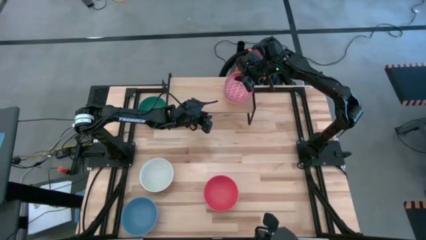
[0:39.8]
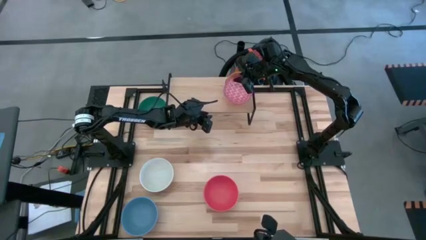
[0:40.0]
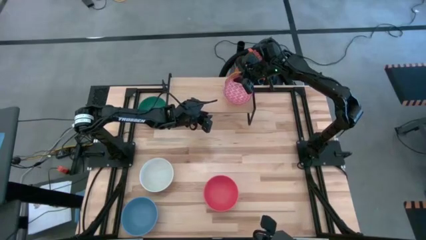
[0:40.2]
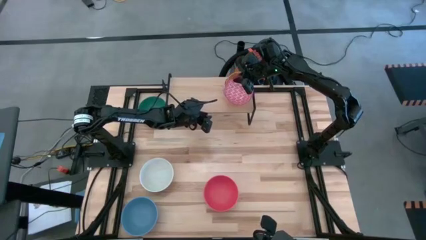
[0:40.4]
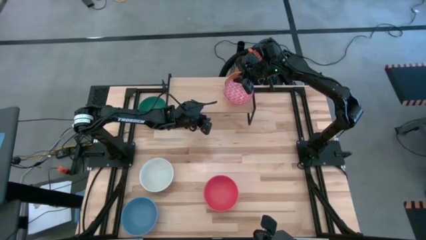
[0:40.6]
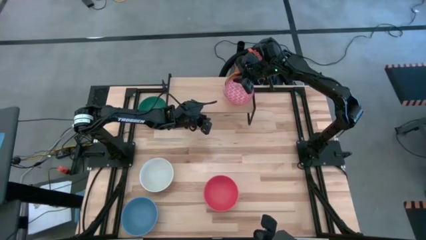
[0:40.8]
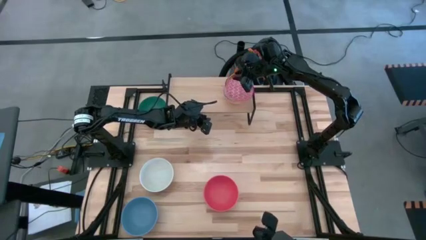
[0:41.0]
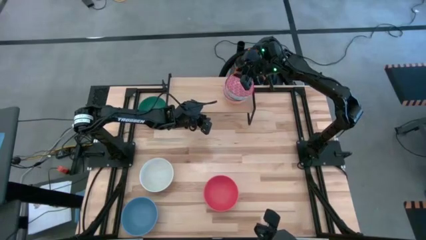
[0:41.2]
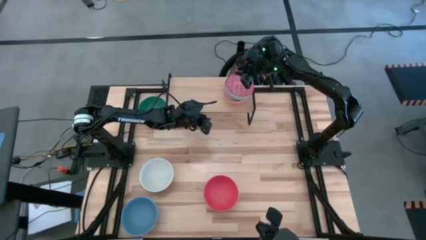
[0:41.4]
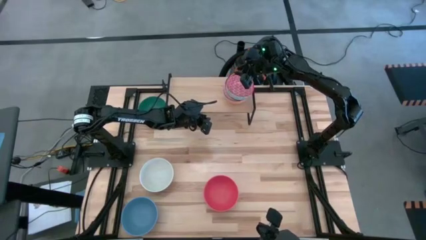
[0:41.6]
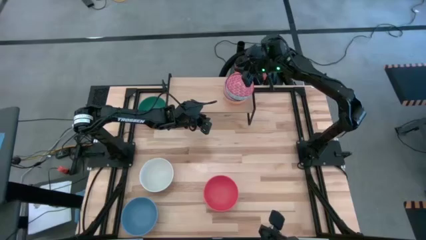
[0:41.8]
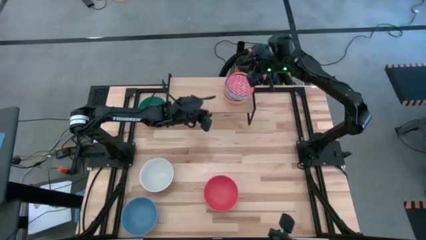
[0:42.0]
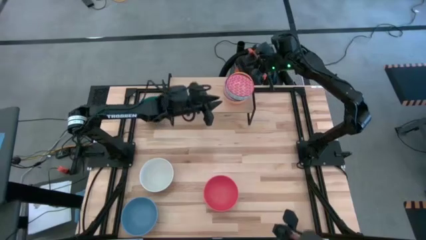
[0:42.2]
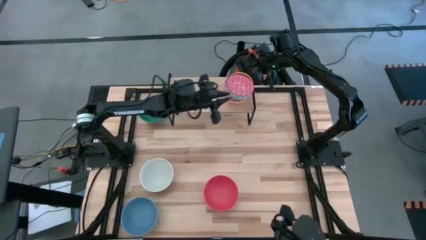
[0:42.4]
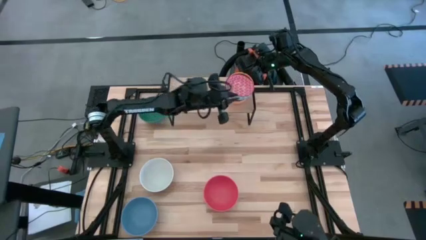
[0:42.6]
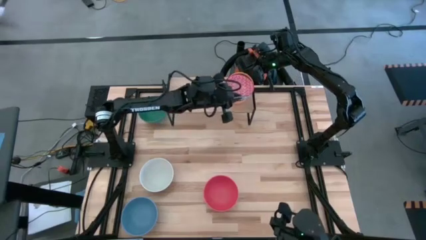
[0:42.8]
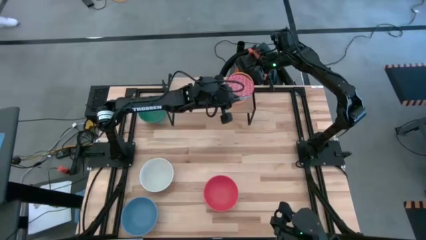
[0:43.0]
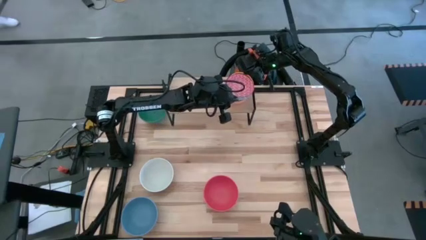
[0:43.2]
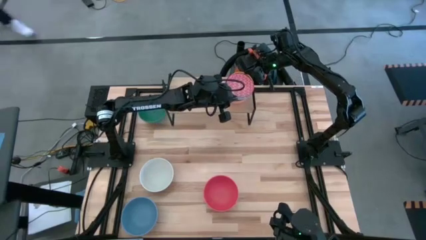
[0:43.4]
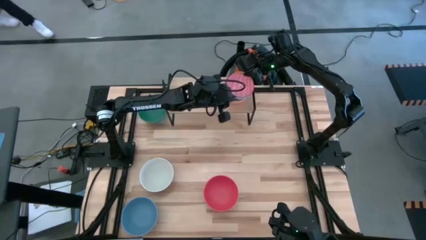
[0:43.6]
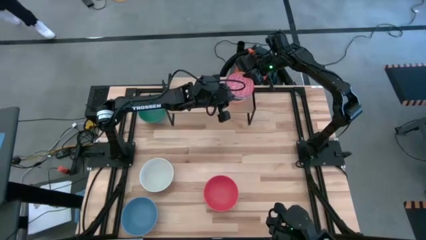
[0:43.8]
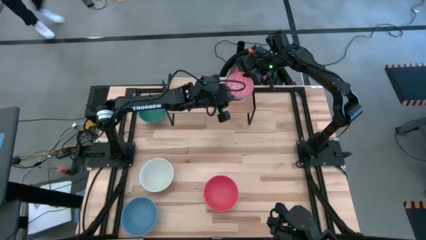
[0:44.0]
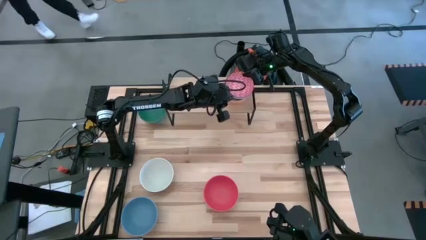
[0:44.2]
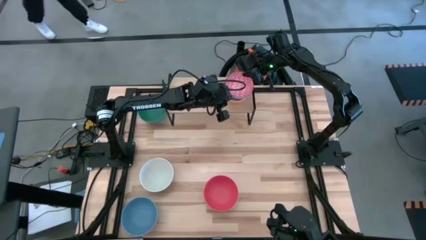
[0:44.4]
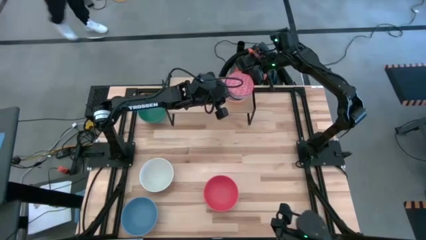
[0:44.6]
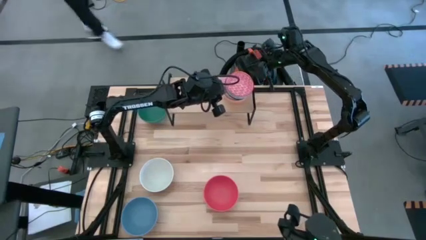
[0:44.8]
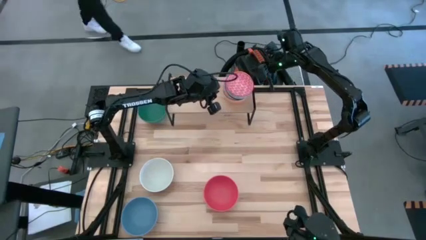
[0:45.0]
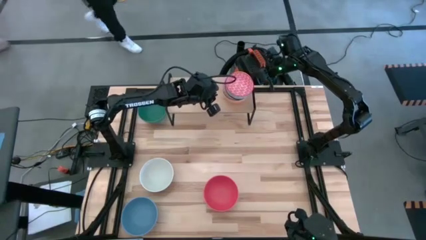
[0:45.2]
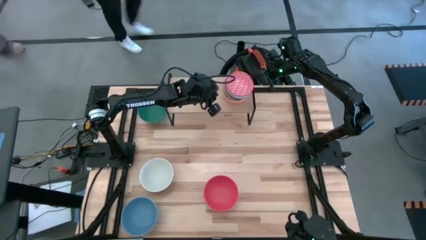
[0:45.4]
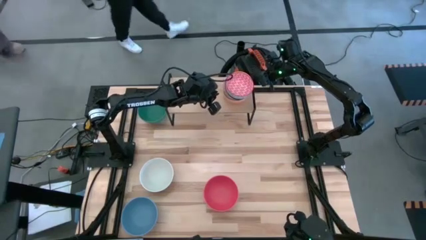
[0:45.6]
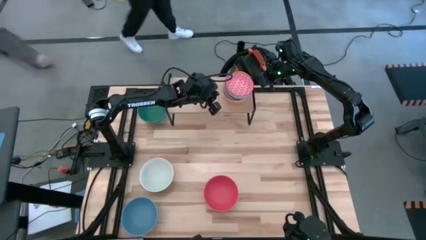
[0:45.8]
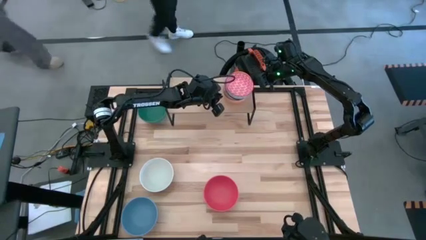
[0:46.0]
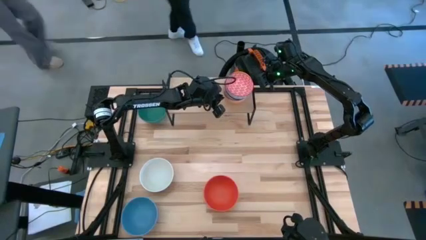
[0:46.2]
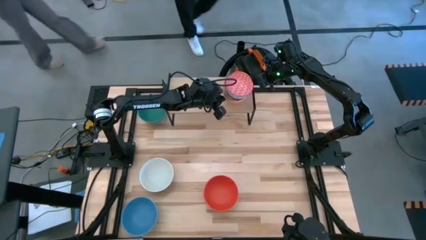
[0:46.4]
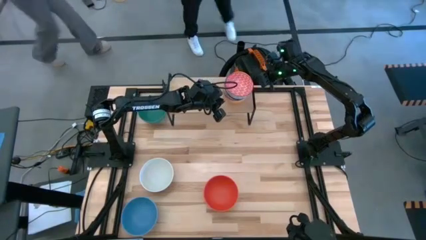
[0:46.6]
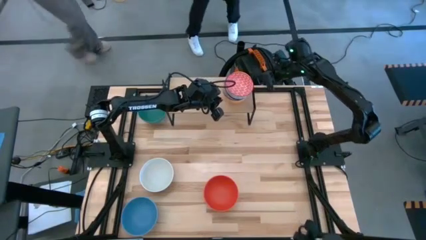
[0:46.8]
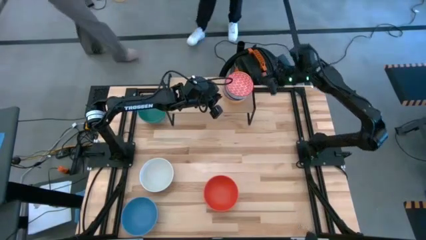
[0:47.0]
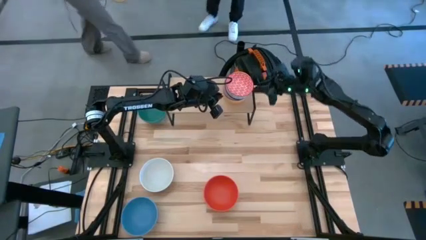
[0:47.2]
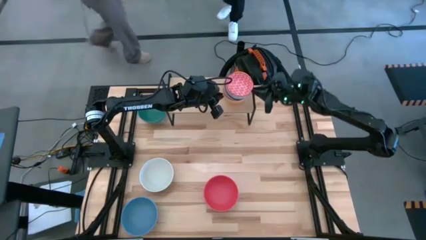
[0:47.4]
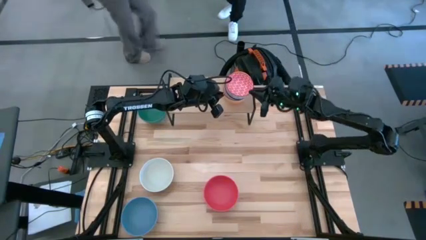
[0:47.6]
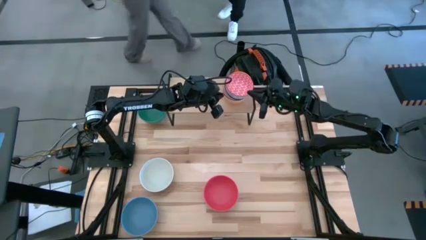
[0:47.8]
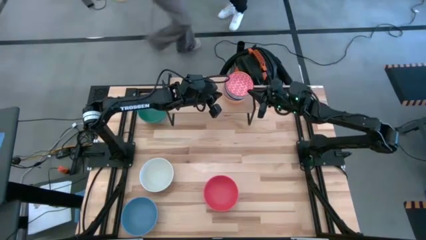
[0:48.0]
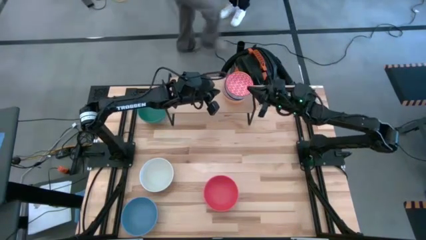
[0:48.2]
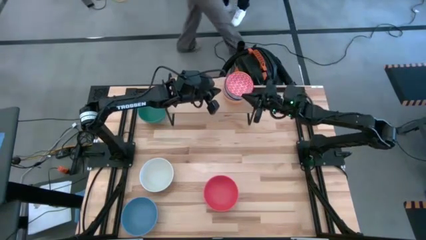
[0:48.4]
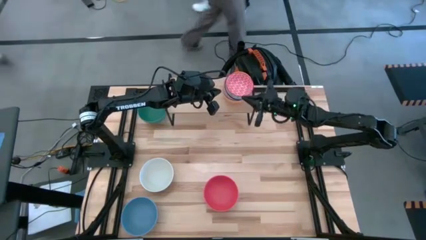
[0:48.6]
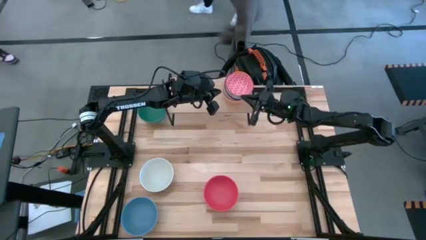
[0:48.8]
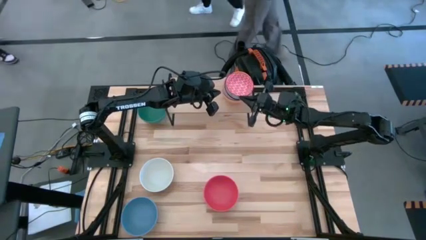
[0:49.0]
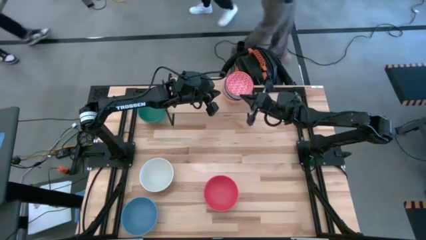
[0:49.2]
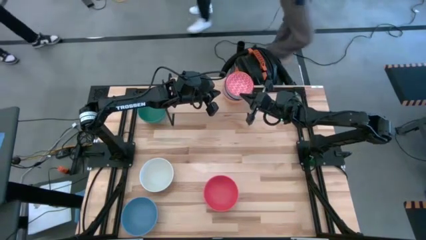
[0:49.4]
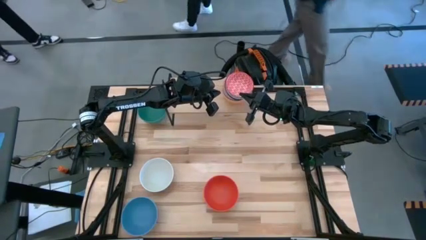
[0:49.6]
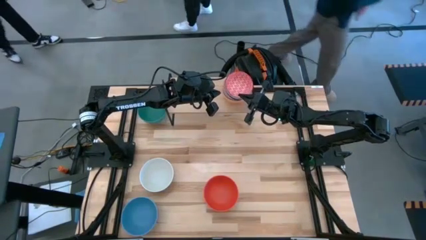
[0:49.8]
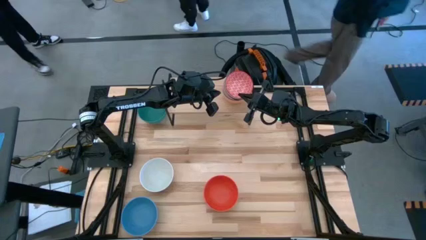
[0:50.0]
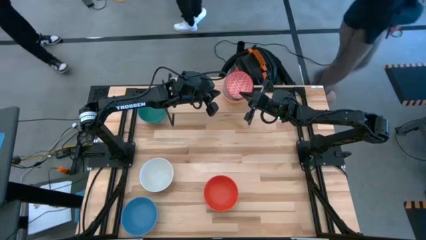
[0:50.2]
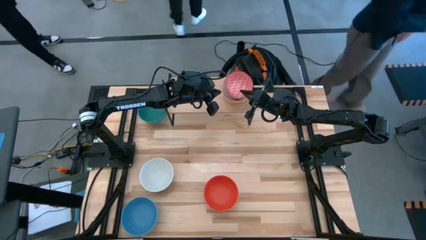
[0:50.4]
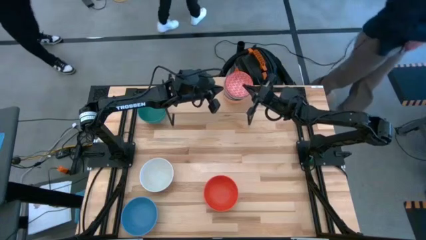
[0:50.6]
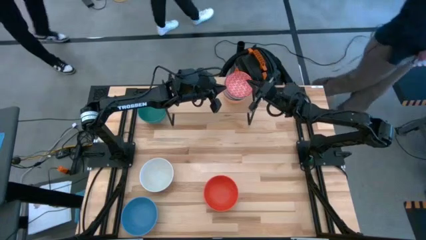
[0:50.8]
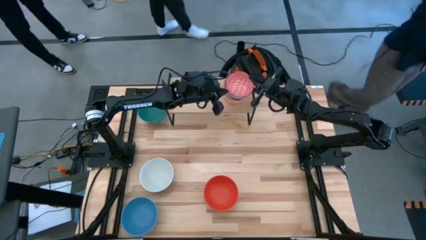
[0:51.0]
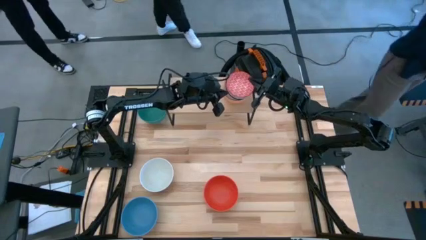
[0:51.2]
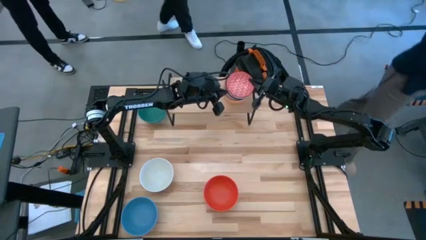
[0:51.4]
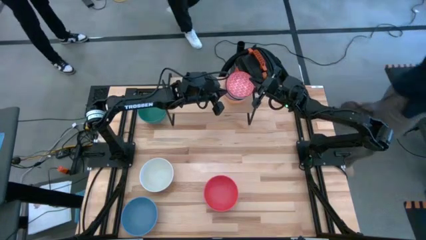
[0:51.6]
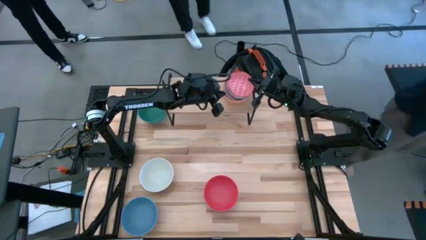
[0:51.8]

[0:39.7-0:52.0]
Task: Place and stack bowls onto a shelf
Stack the red patterned bowl on top of the yellow patterned bowl on the shelf
